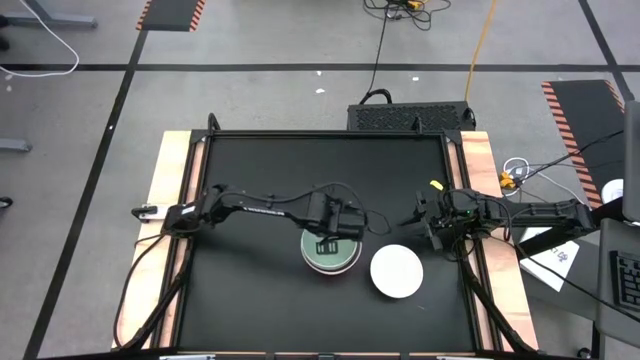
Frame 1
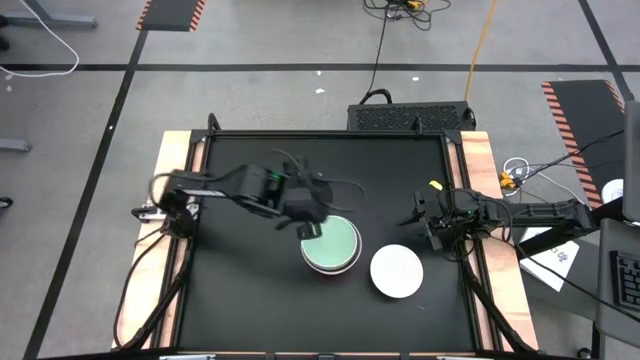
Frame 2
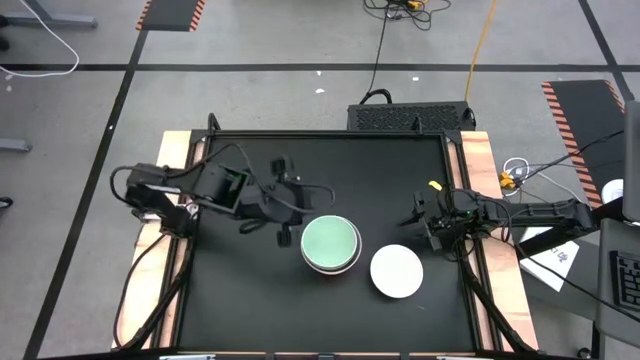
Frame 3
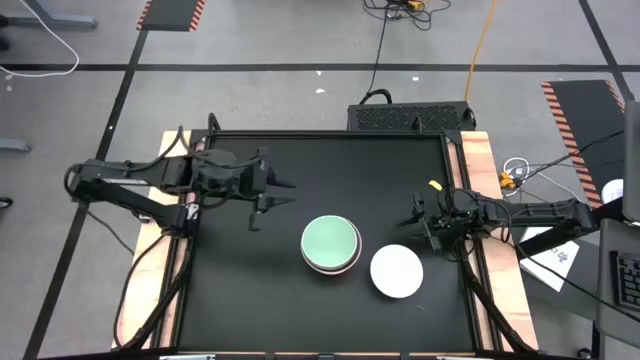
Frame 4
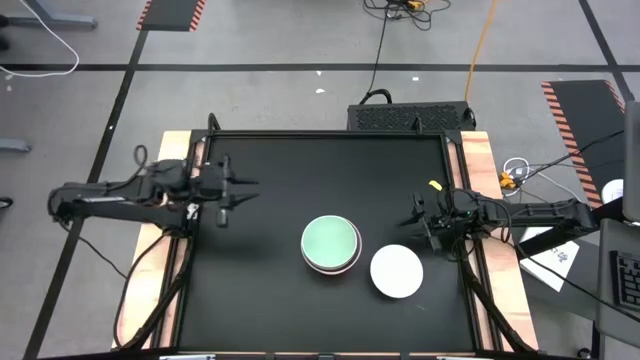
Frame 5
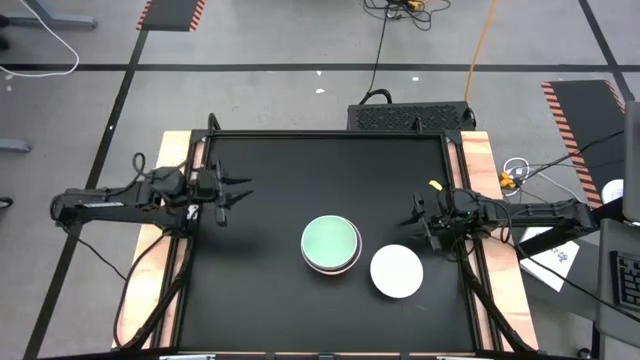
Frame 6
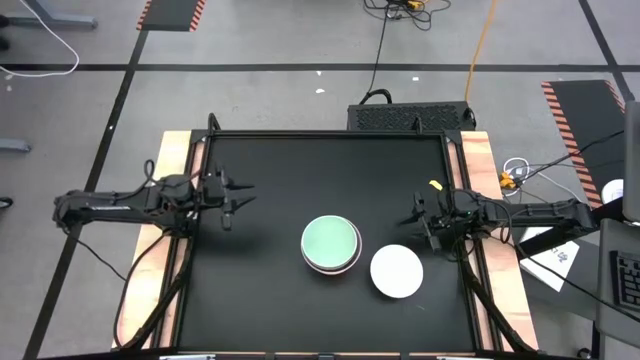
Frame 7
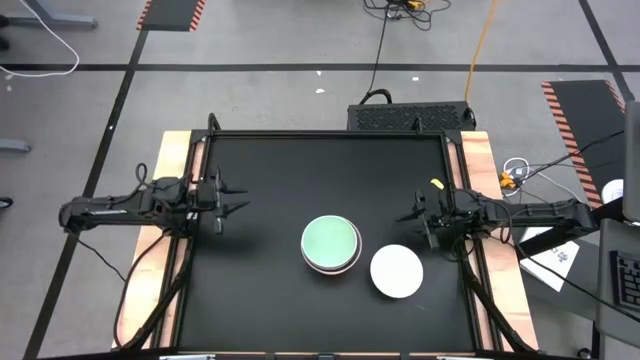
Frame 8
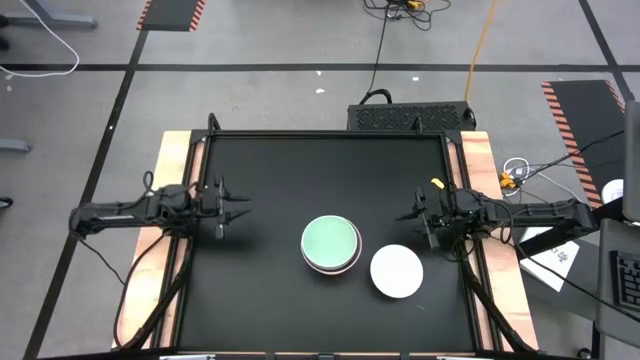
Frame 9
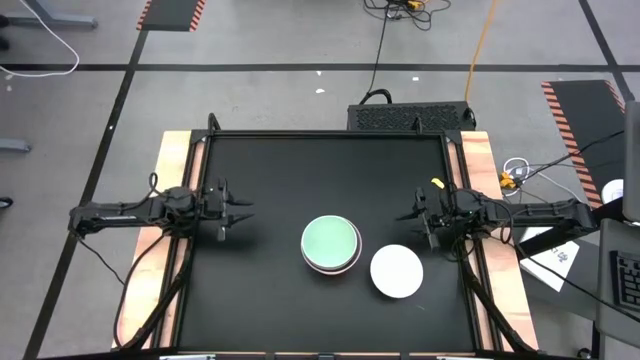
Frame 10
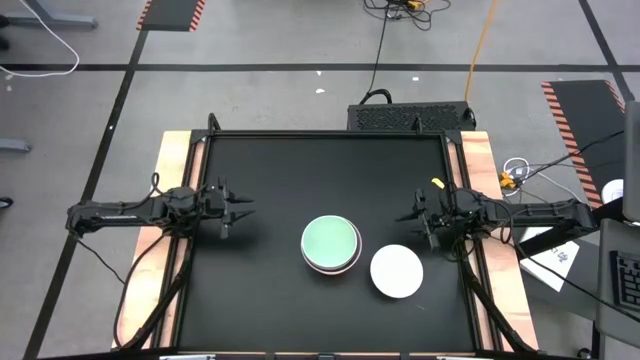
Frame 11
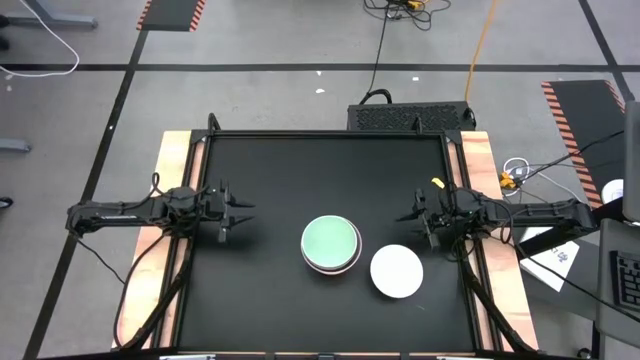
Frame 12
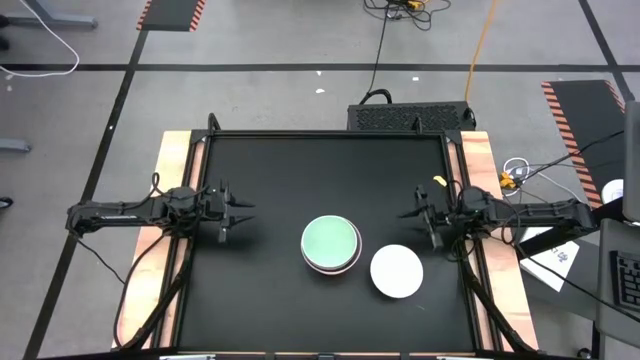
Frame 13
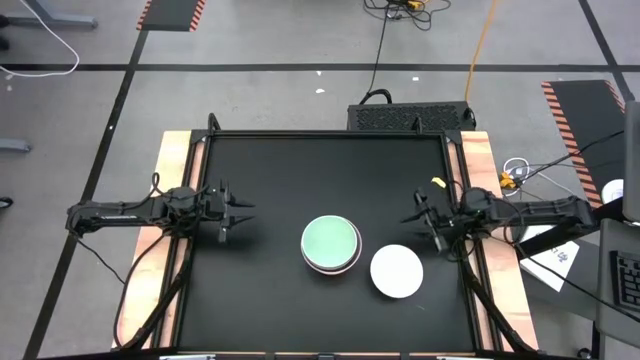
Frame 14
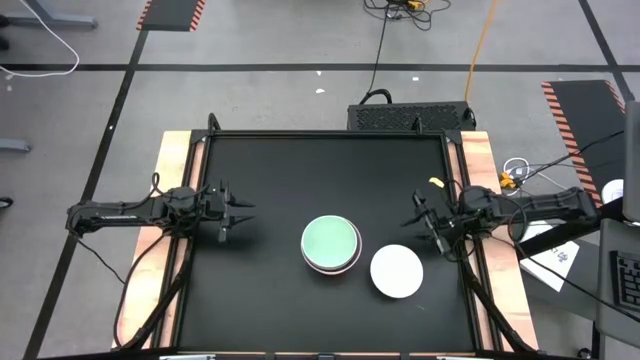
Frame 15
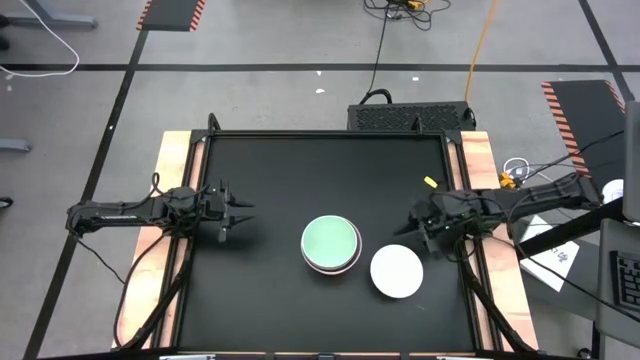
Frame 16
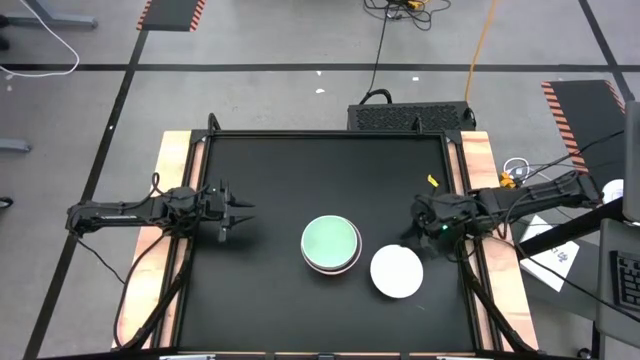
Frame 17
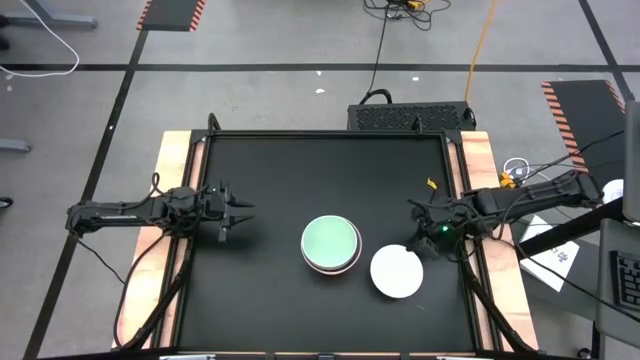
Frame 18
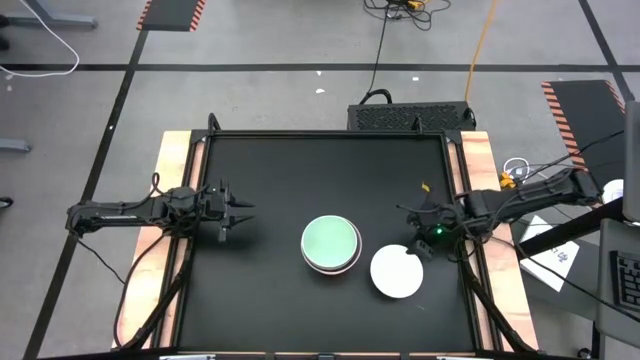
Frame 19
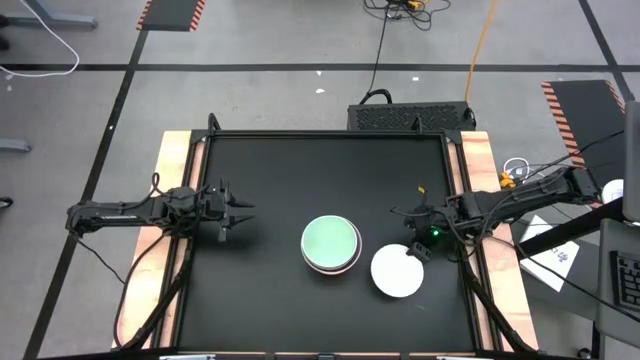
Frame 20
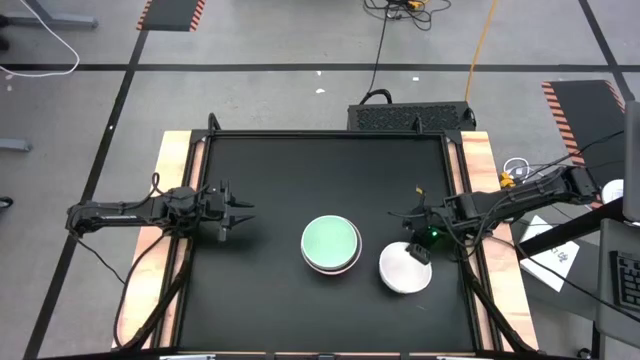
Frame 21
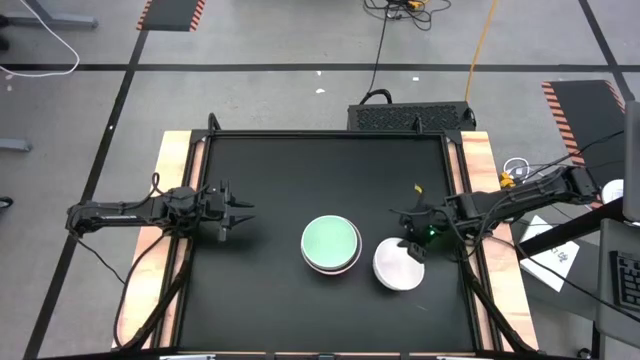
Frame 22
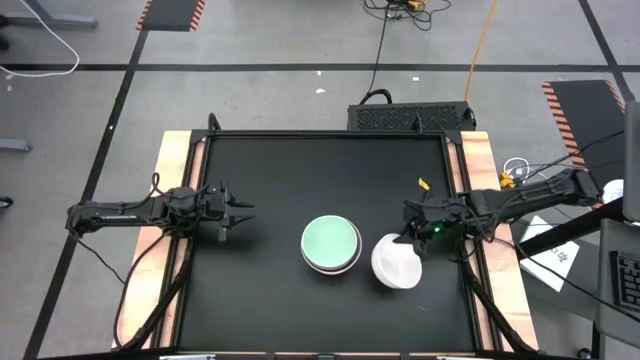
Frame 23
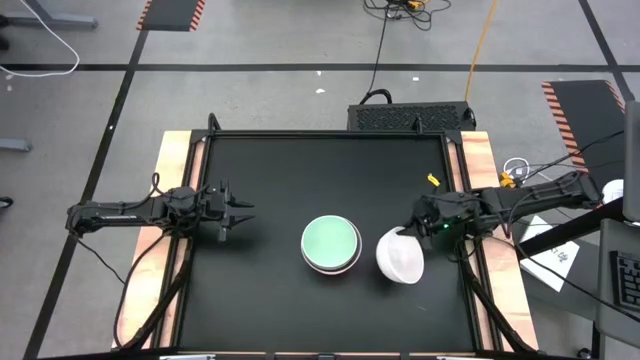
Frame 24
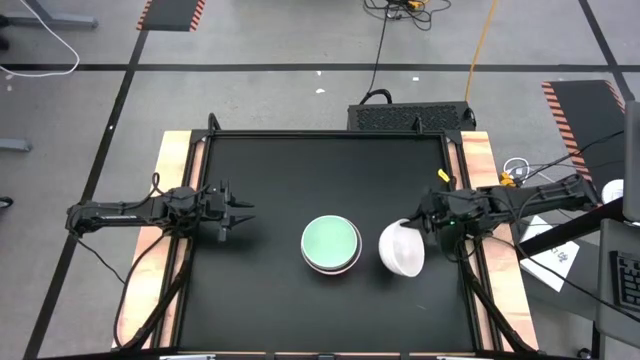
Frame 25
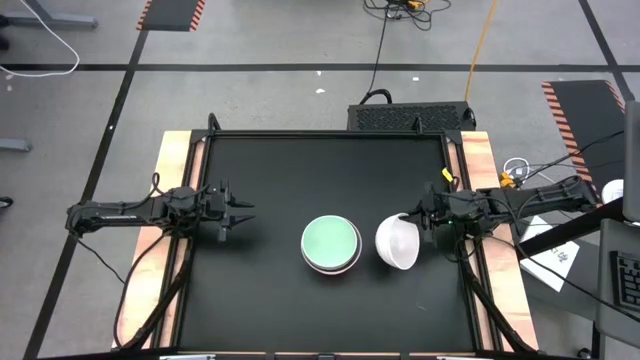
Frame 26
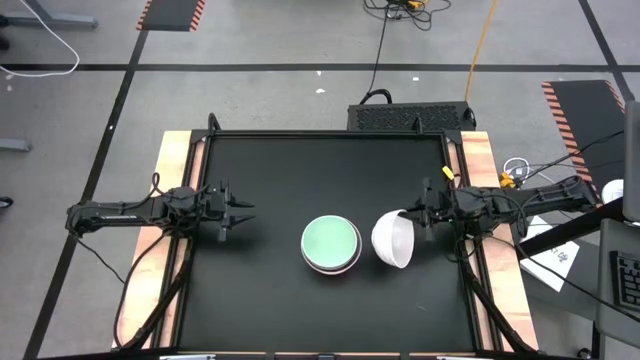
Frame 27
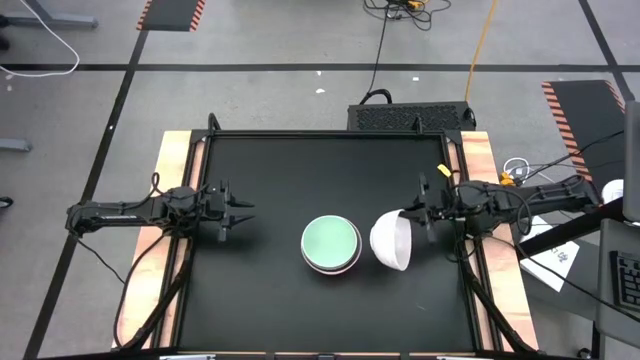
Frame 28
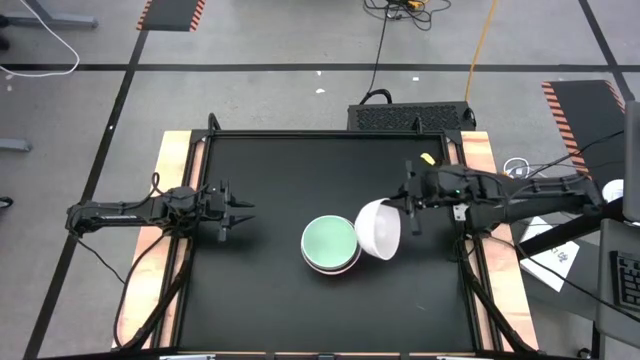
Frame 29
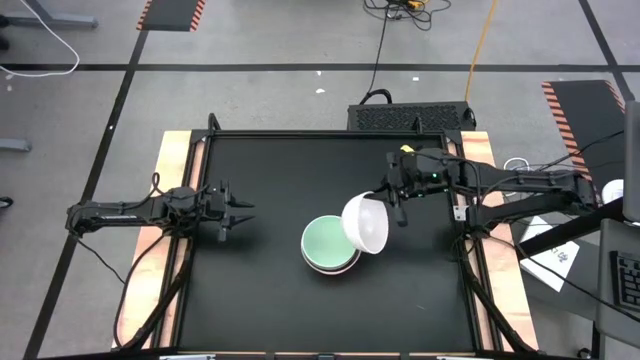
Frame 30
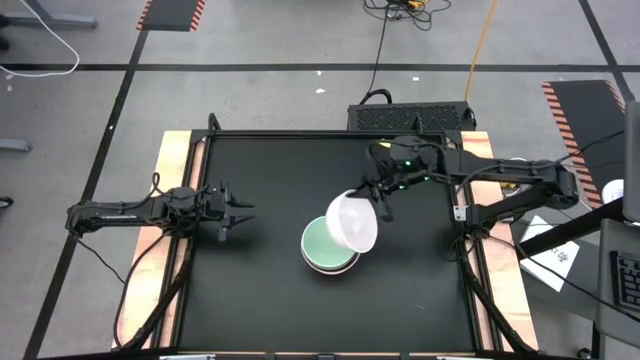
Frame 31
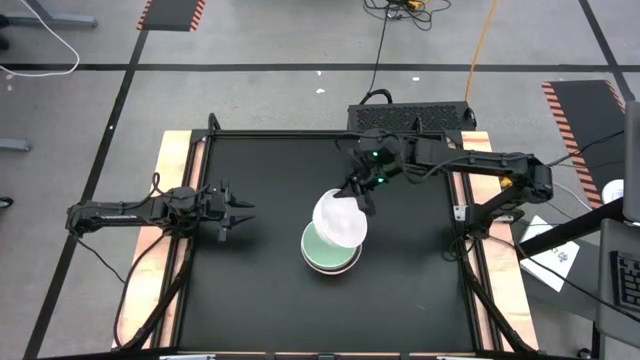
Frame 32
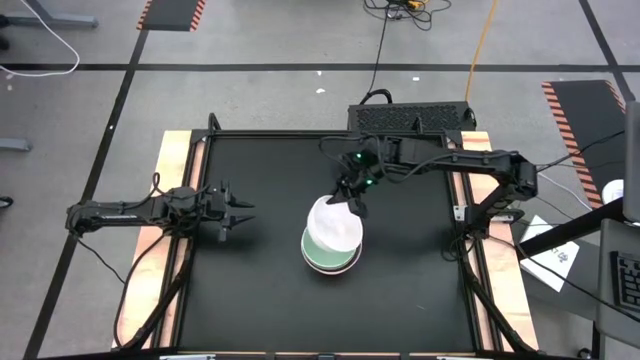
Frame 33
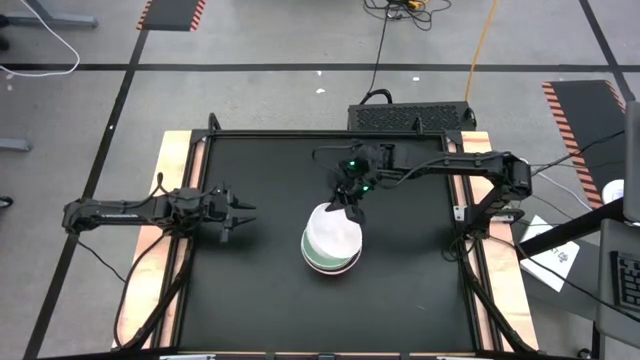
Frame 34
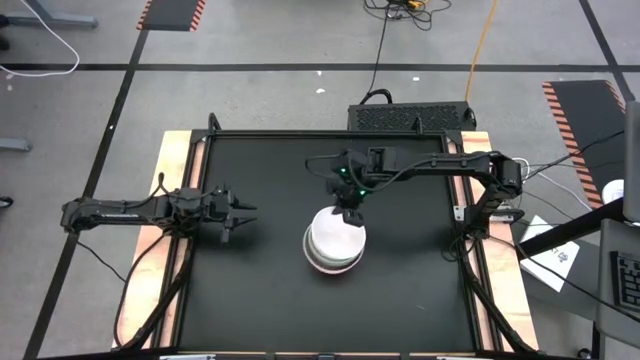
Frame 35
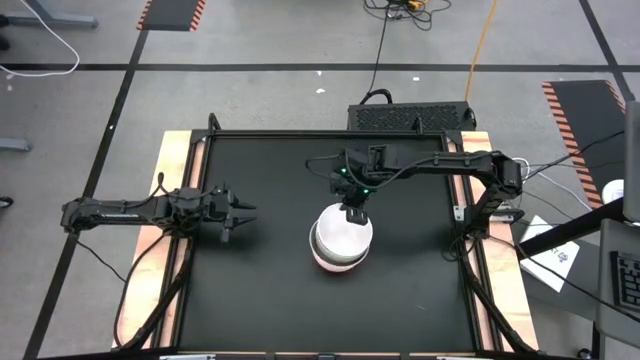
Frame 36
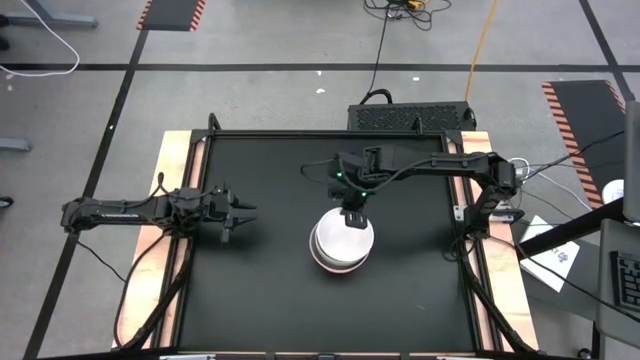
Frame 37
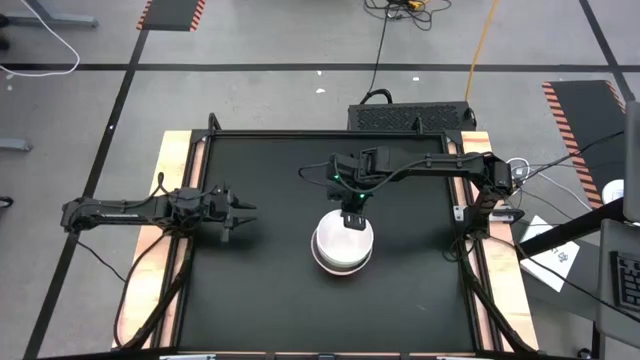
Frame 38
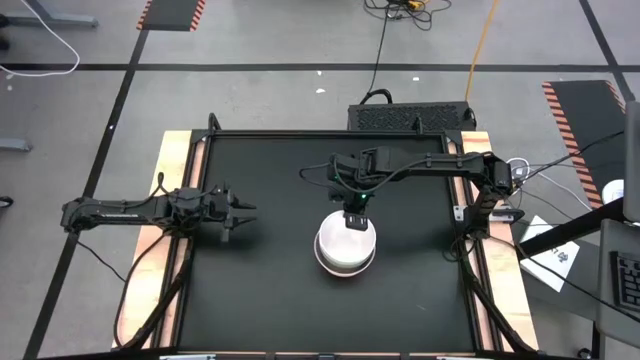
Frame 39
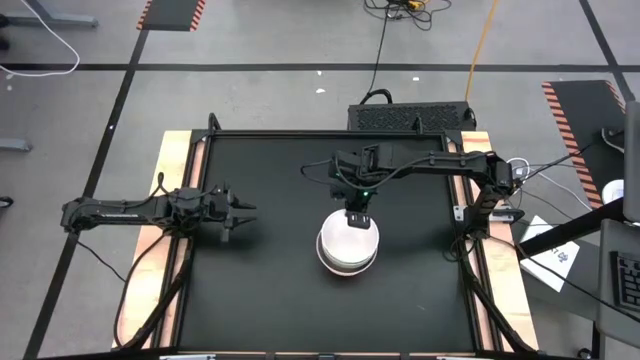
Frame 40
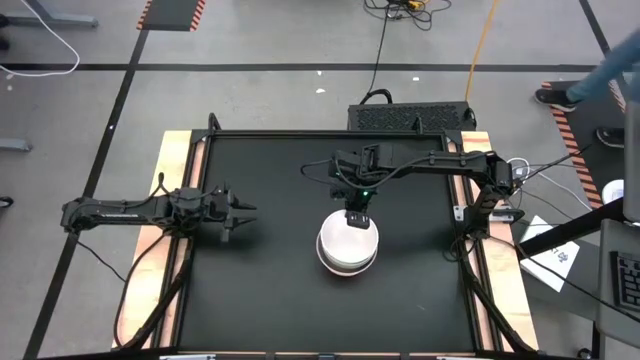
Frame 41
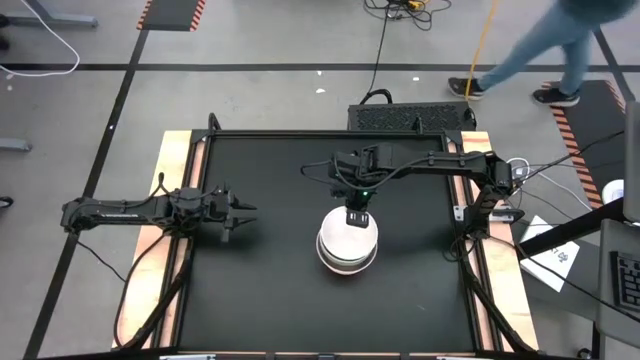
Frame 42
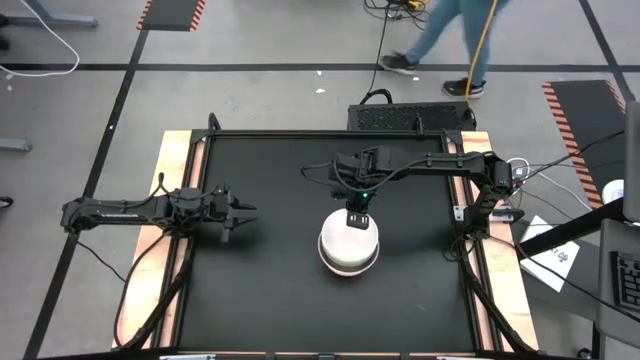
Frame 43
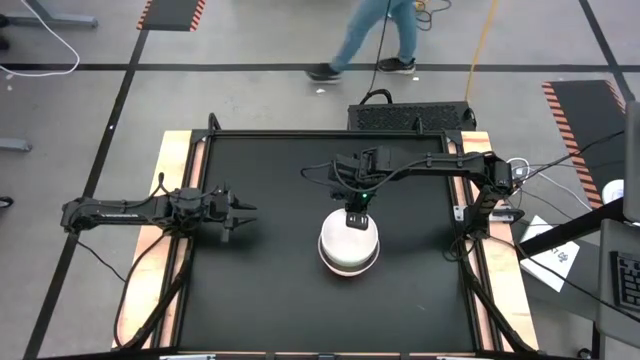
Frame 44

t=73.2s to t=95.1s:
Task: Nest bowls inside each other
Stack the white bowl on the light green bowl
